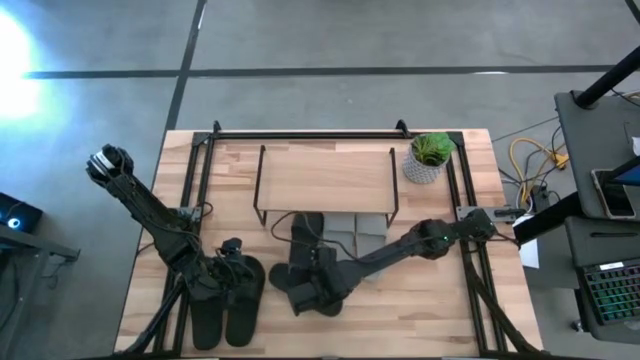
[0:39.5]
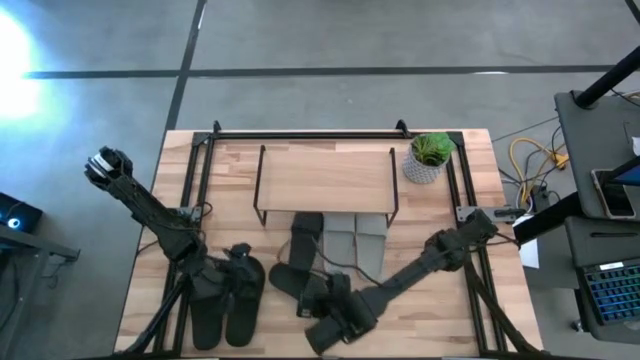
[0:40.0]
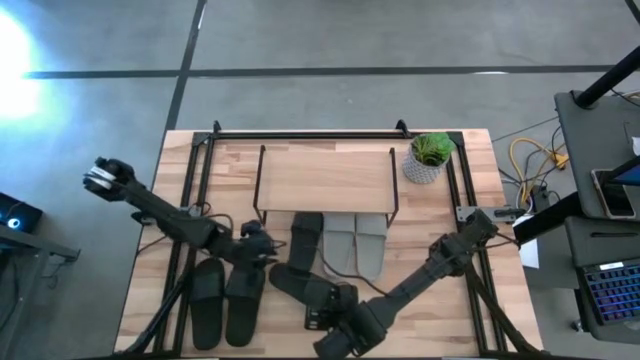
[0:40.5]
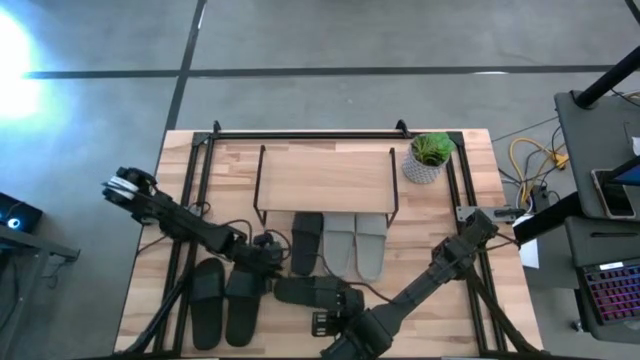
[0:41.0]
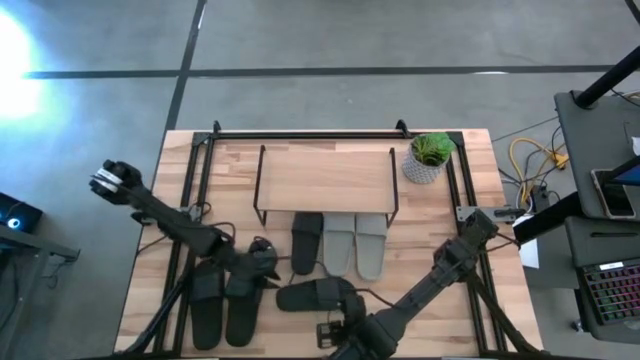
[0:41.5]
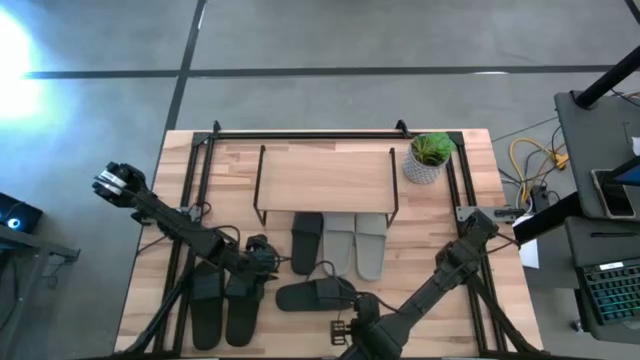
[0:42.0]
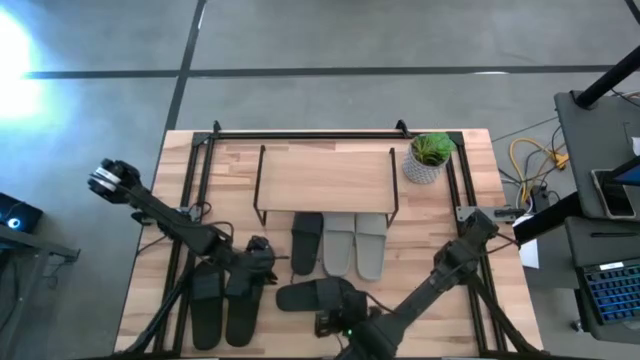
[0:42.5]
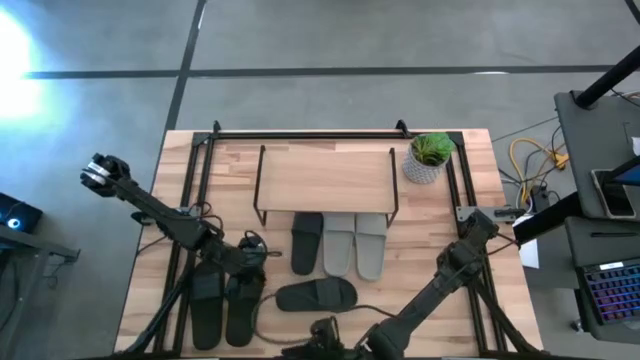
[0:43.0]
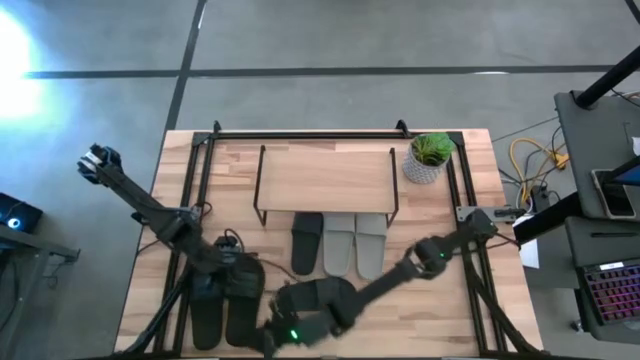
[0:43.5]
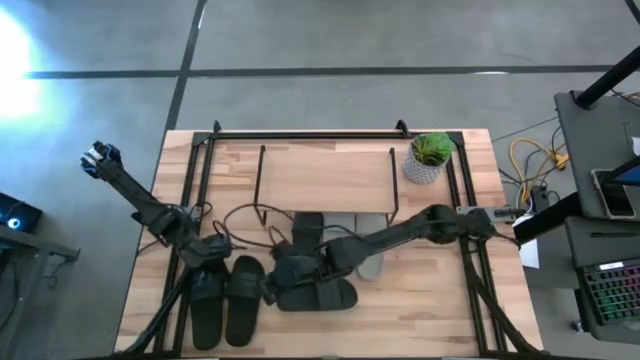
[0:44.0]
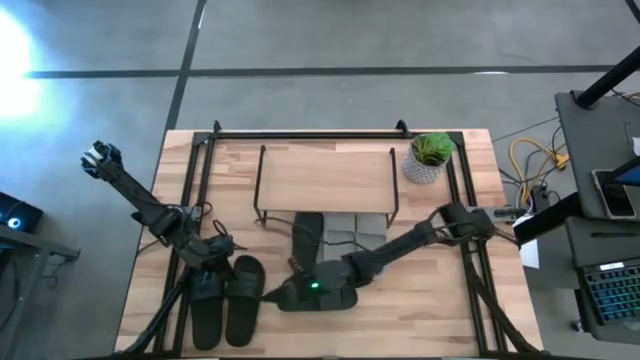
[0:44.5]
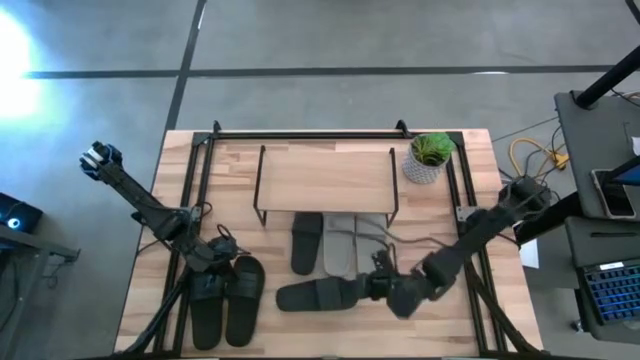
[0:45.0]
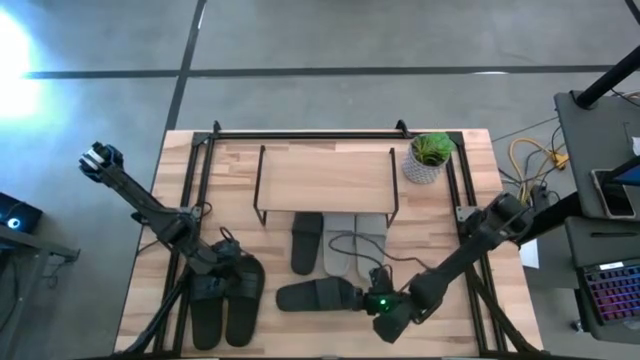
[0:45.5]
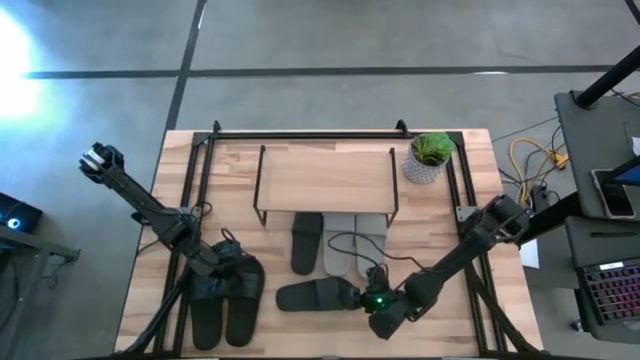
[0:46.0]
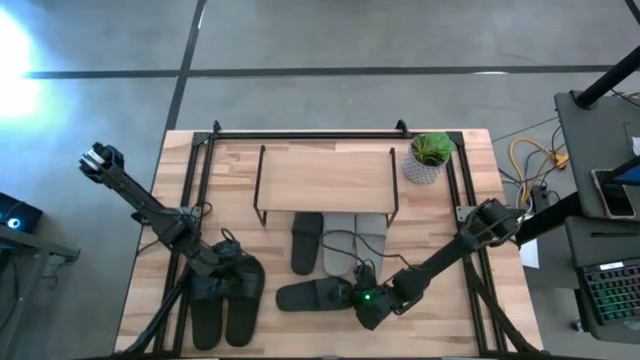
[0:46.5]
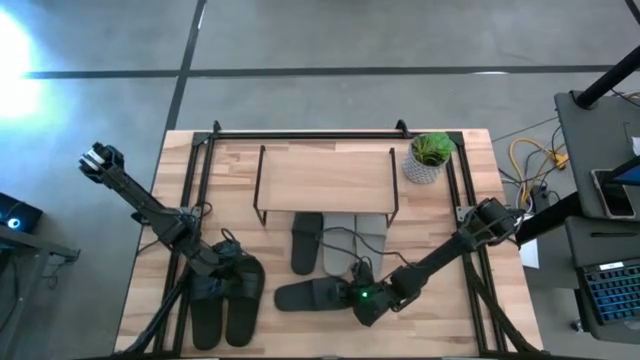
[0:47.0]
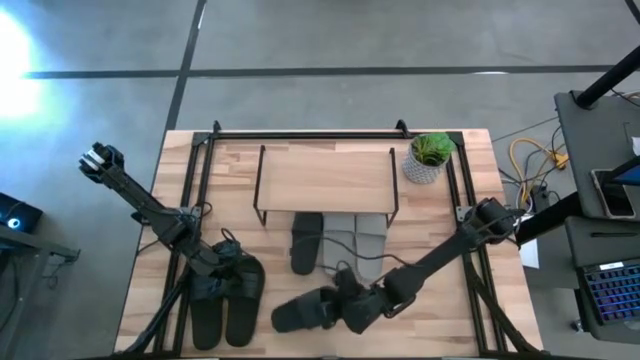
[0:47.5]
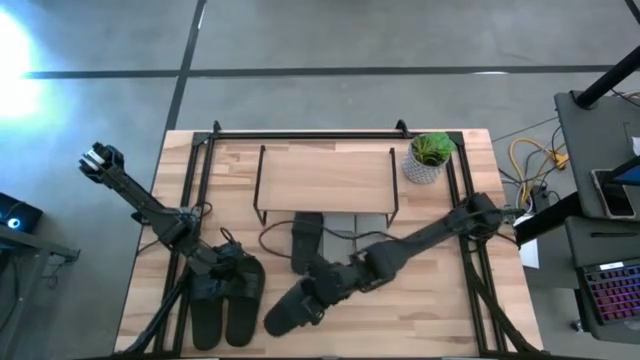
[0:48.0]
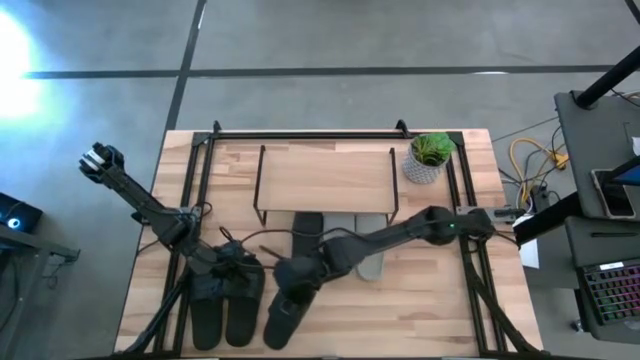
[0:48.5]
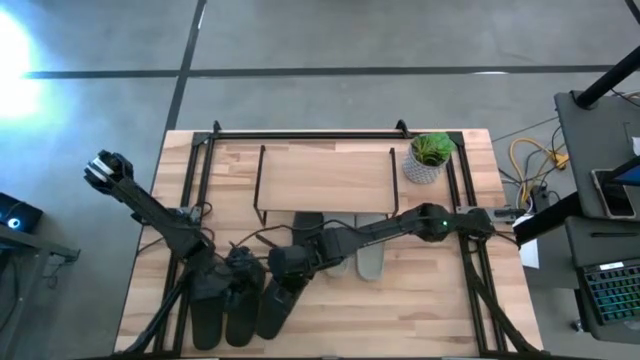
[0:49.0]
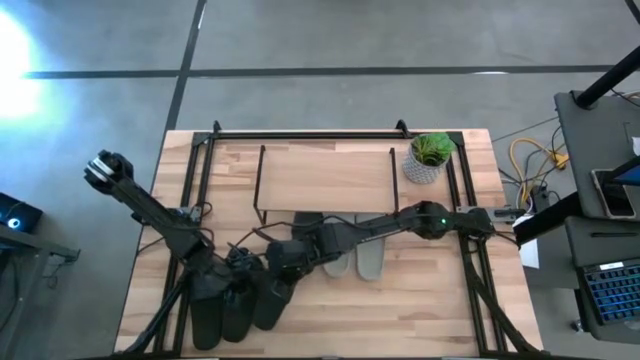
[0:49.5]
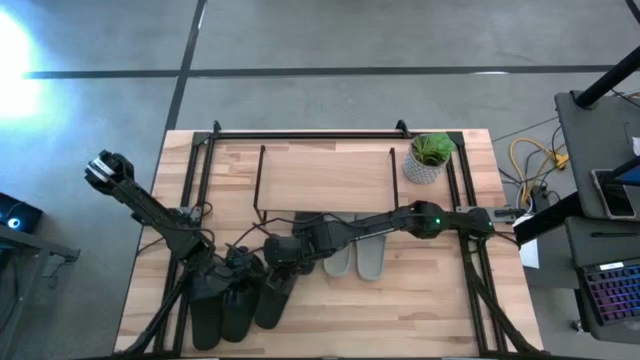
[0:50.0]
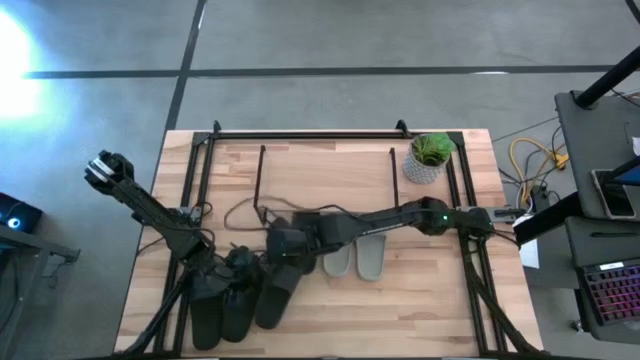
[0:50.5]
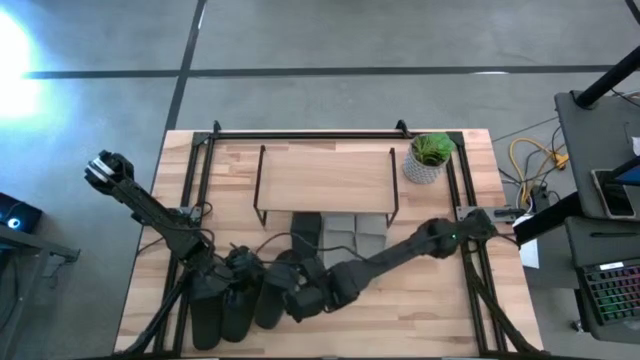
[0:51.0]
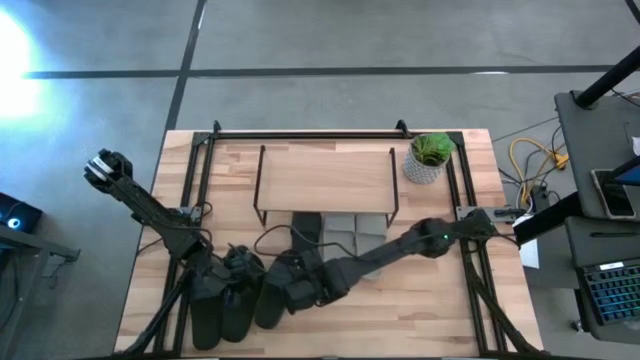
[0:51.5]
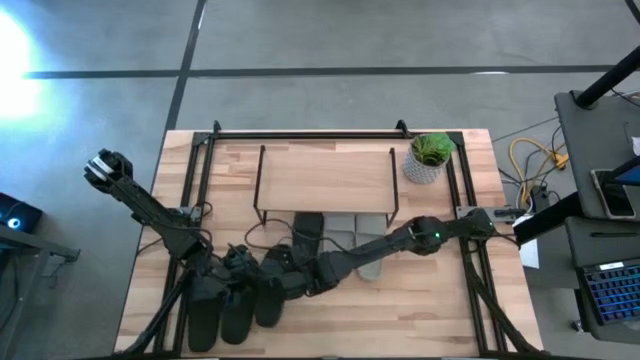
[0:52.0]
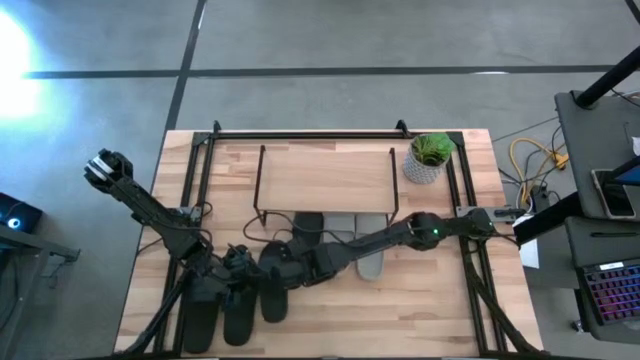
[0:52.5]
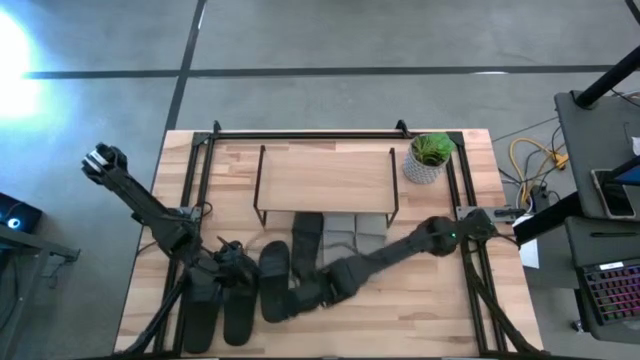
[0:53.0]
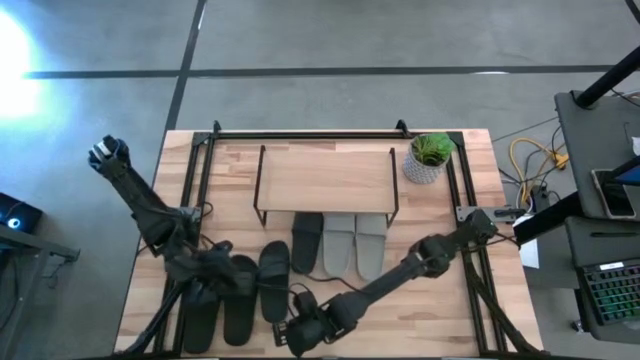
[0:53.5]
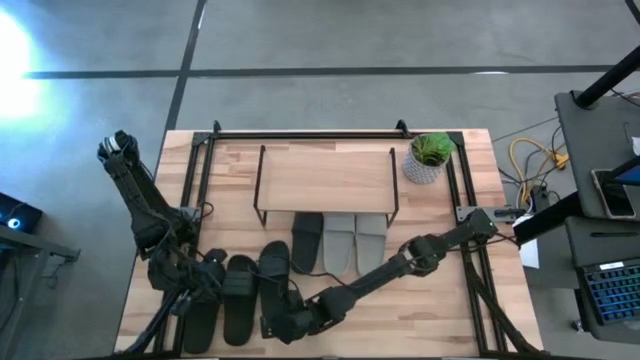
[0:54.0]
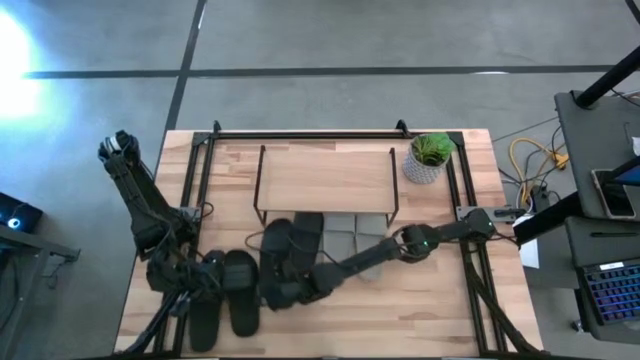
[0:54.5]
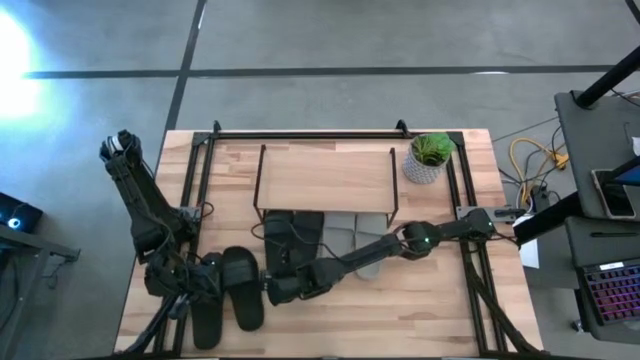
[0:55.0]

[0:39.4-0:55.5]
Task: Pick and place slides into the shelf
Put the black slide under the shelf

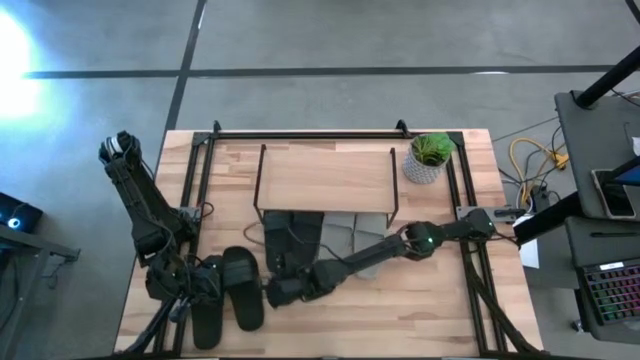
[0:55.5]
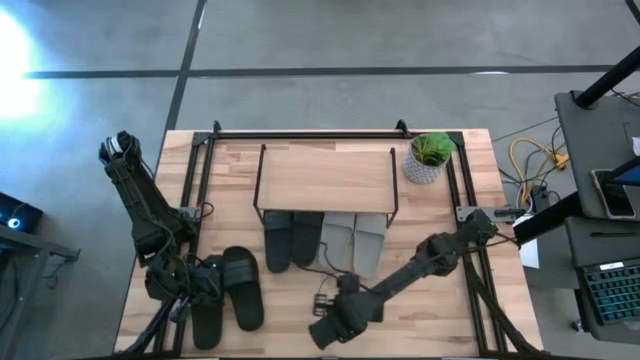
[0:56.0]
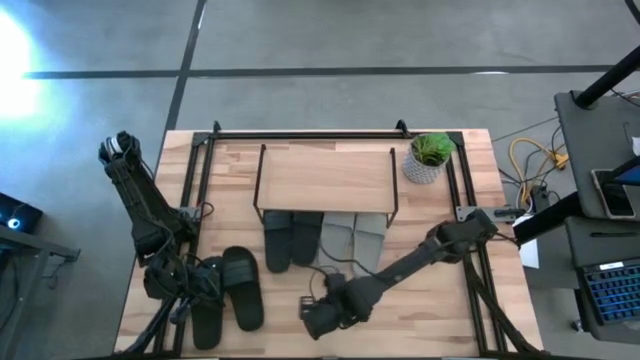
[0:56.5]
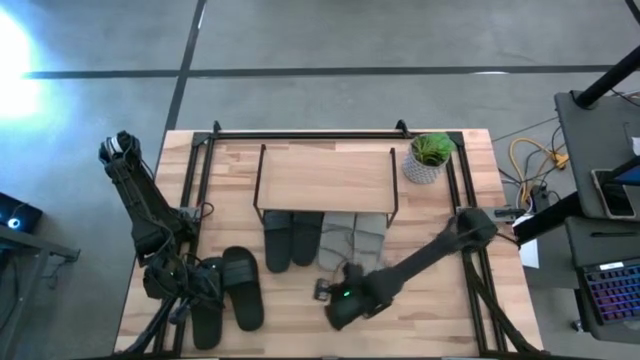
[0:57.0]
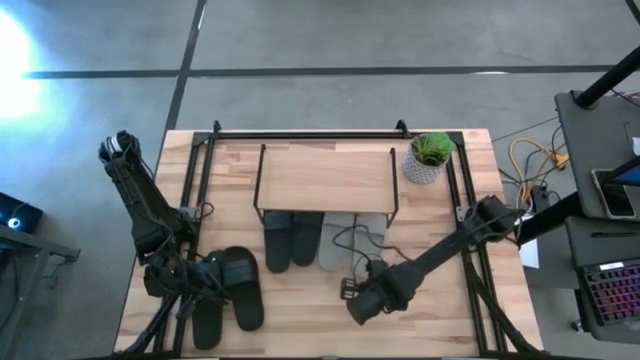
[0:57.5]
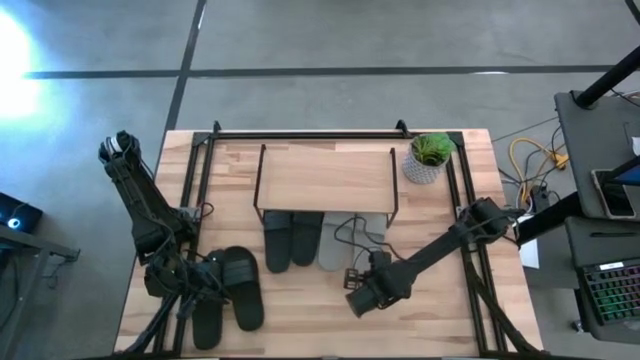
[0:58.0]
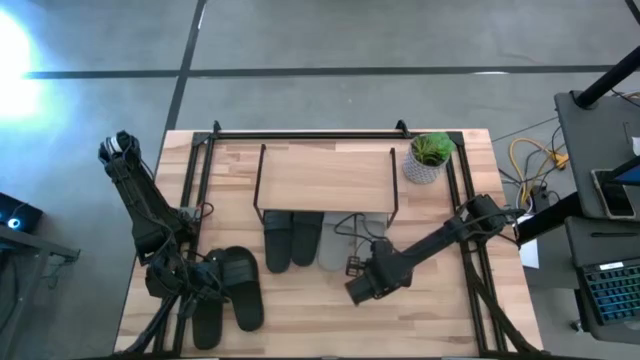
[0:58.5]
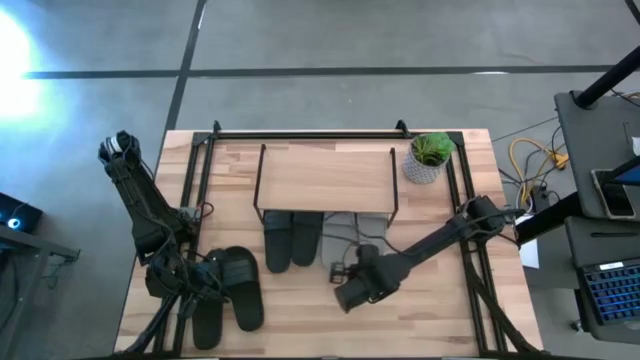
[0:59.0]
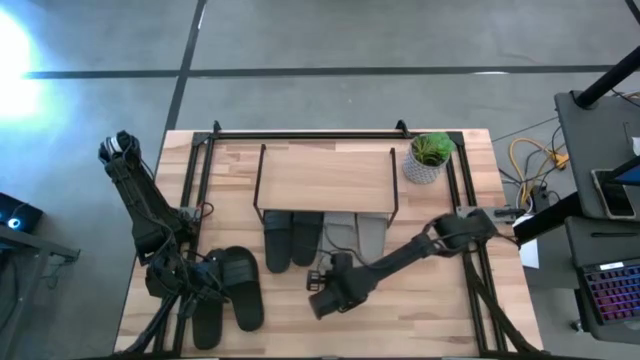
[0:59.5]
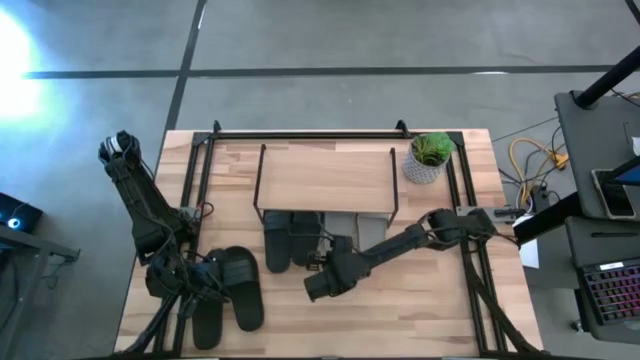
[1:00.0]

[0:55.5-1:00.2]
Adjust the grey slides under the shelf
